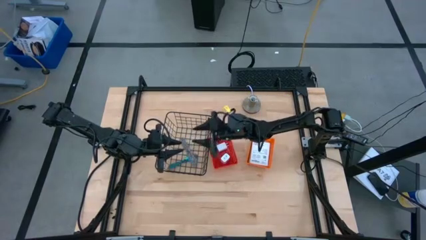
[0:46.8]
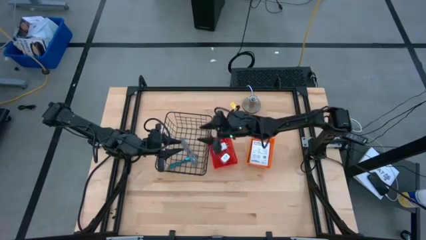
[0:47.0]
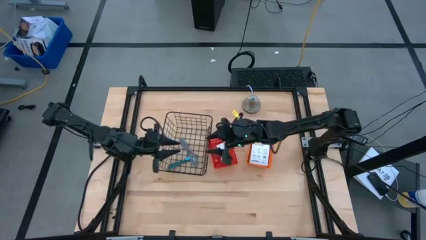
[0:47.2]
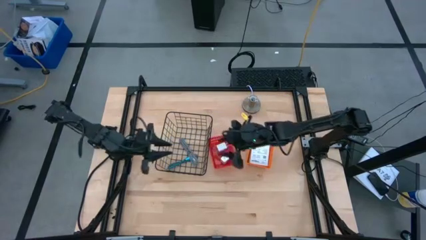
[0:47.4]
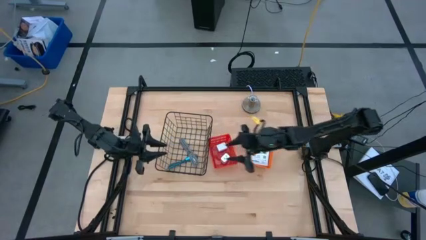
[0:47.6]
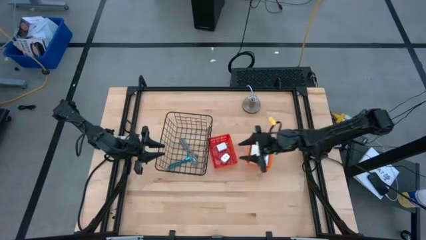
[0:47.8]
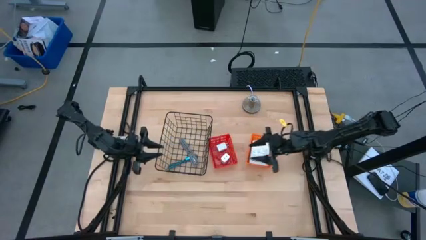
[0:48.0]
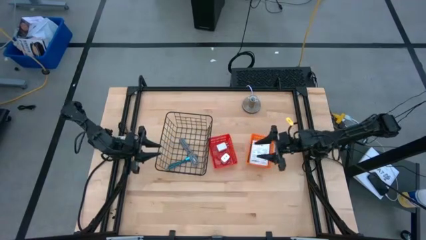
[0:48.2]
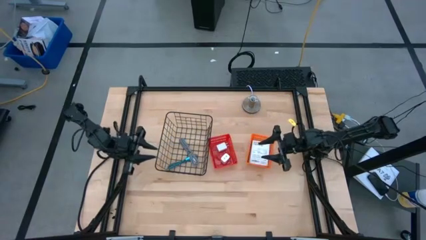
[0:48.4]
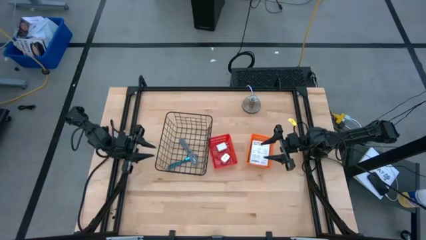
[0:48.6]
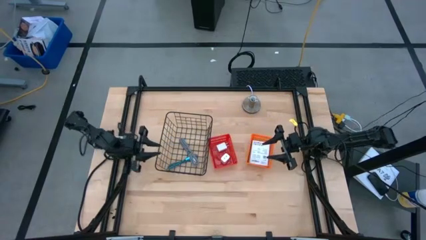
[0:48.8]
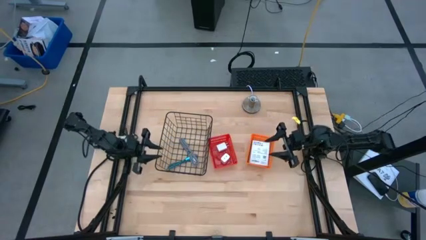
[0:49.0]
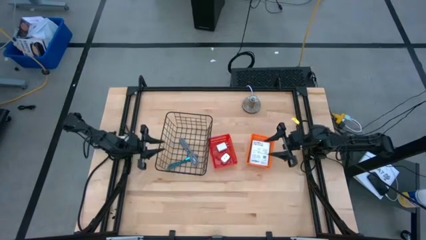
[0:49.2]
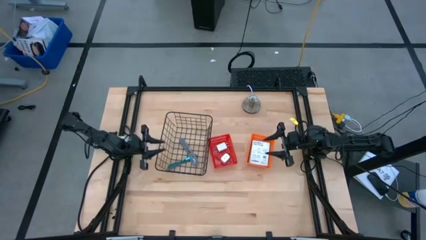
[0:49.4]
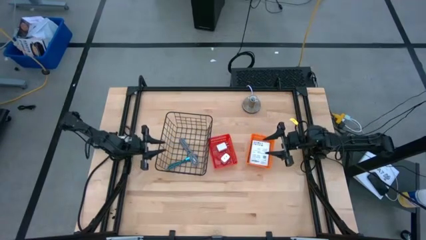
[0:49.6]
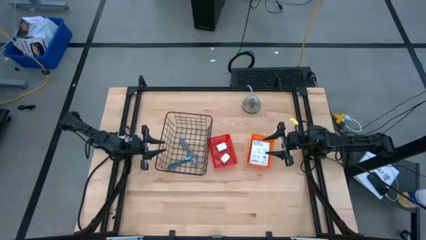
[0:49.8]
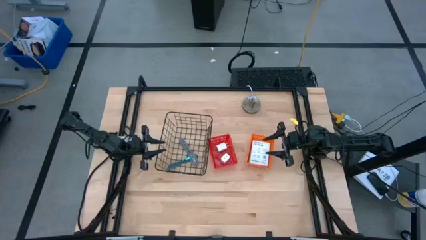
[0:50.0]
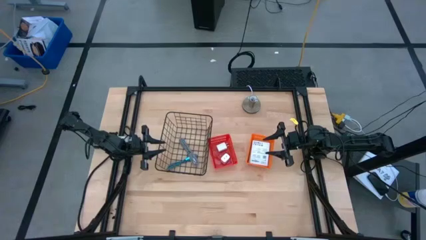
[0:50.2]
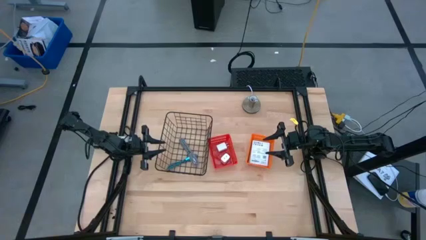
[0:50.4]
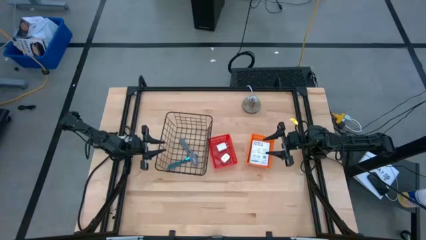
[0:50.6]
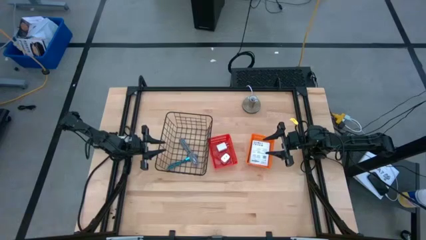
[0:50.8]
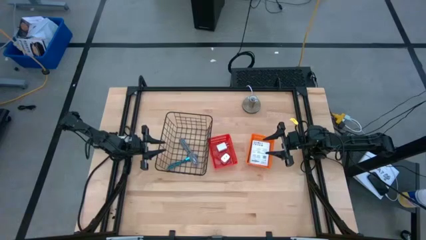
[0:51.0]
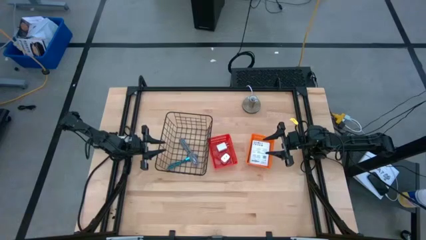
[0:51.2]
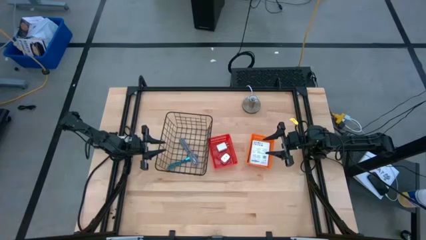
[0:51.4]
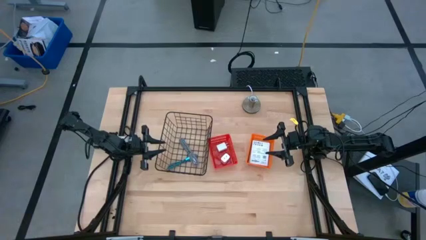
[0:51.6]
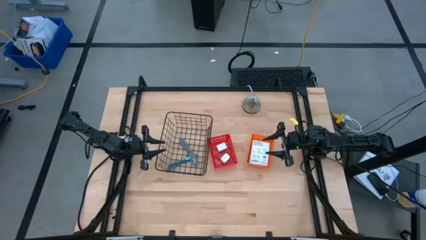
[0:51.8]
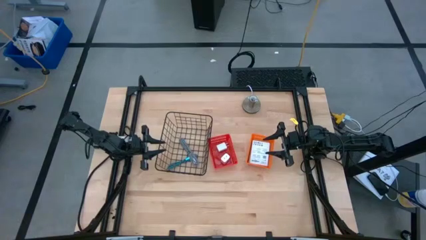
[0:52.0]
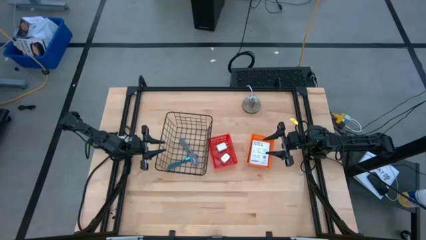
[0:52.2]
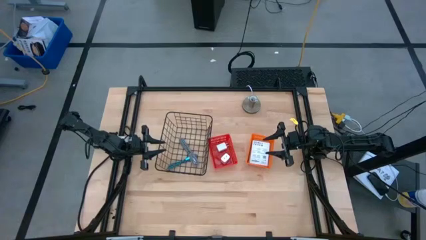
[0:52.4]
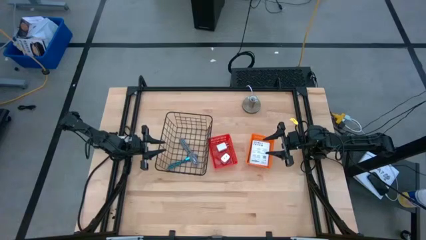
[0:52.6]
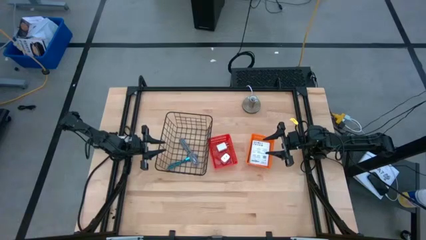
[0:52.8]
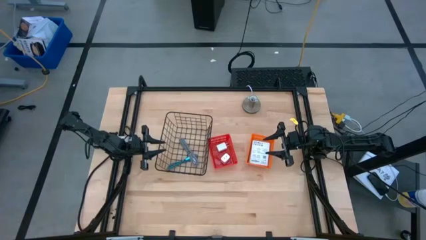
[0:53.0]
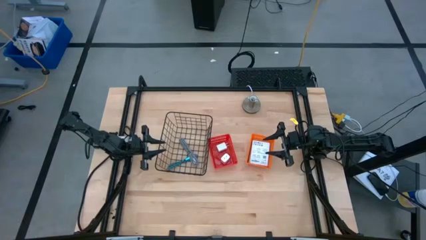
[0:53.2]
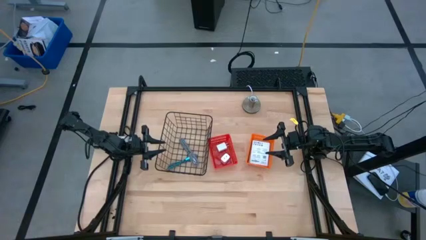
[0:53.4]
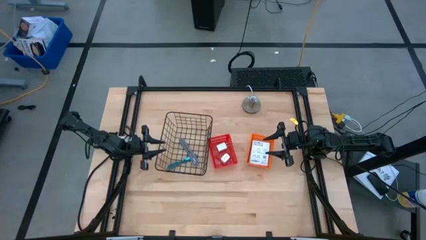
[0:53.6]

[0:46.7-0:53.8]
Task: Pick and place items into bin
Return to Home Position

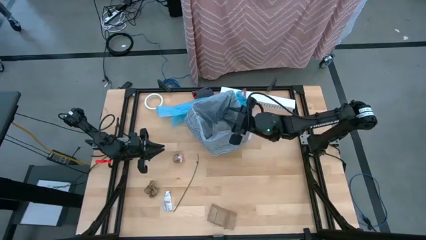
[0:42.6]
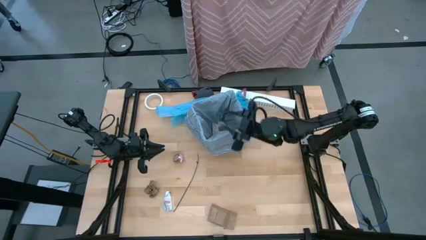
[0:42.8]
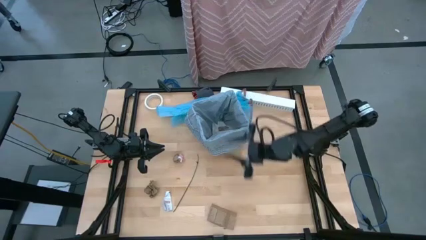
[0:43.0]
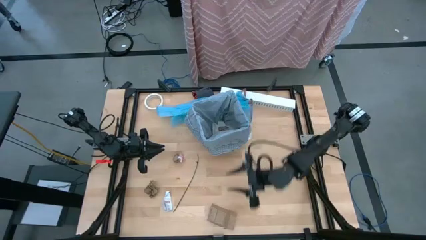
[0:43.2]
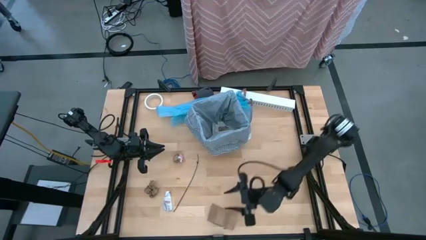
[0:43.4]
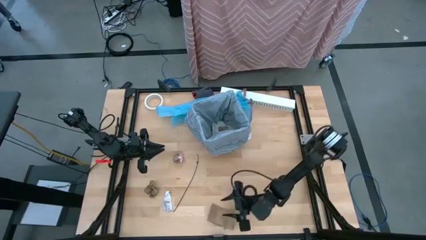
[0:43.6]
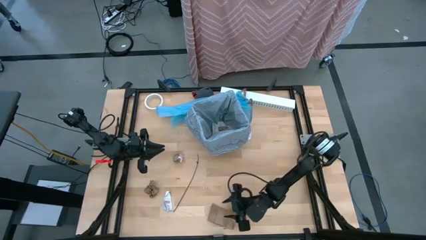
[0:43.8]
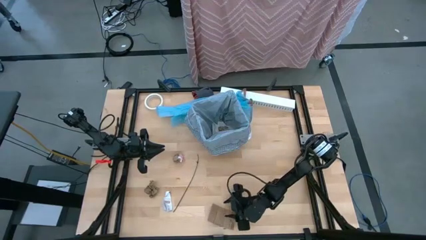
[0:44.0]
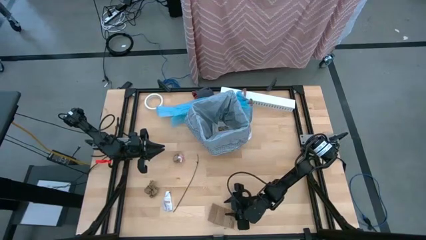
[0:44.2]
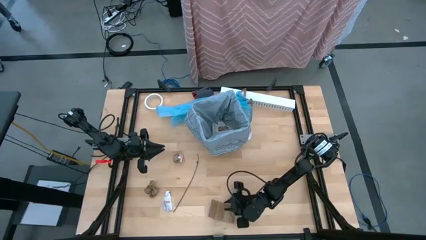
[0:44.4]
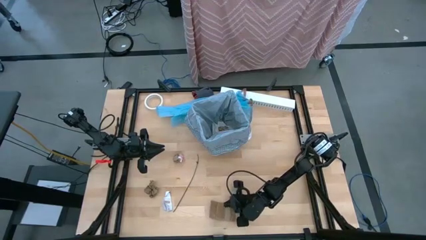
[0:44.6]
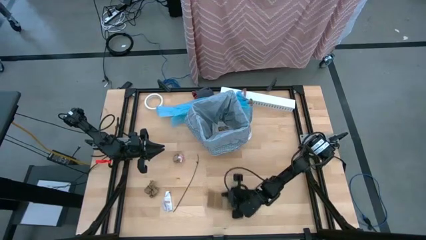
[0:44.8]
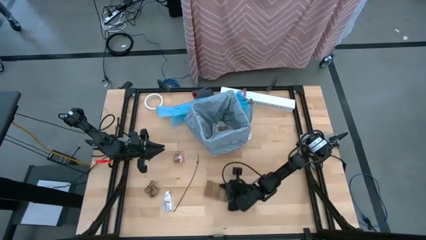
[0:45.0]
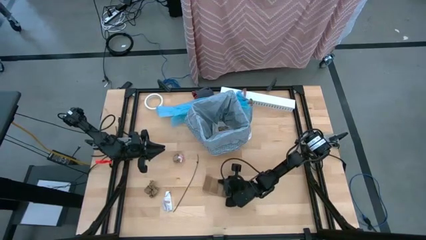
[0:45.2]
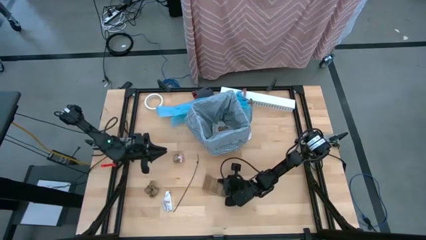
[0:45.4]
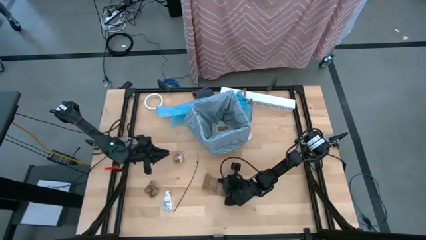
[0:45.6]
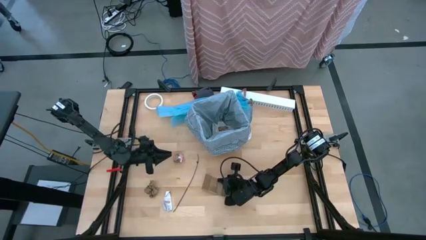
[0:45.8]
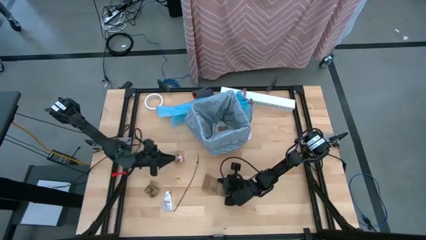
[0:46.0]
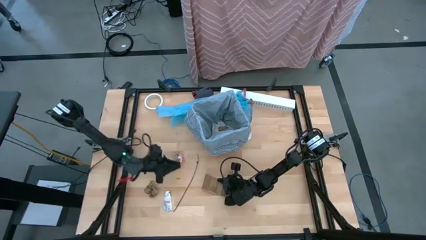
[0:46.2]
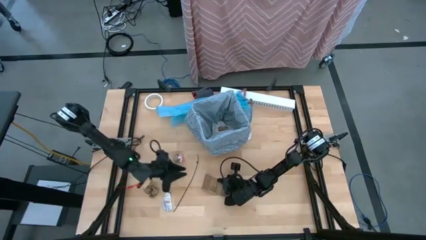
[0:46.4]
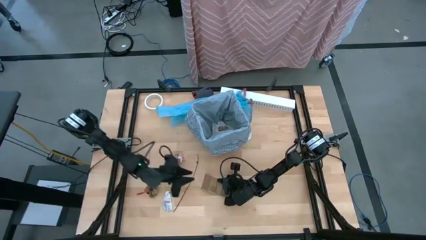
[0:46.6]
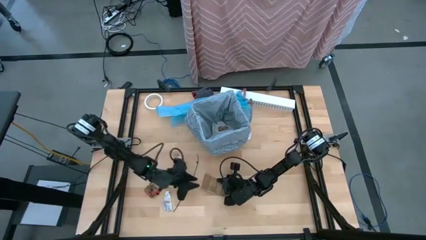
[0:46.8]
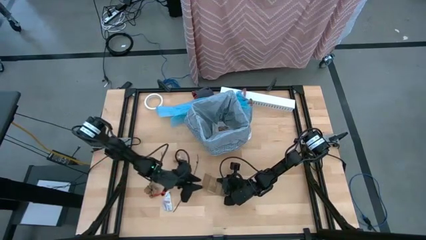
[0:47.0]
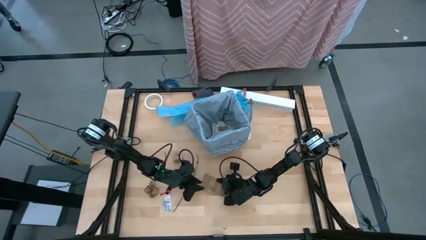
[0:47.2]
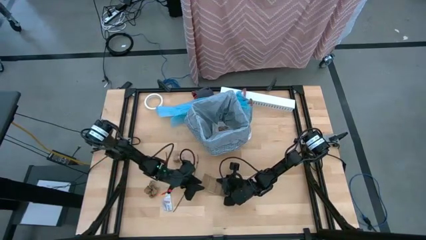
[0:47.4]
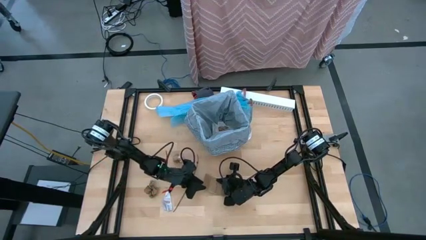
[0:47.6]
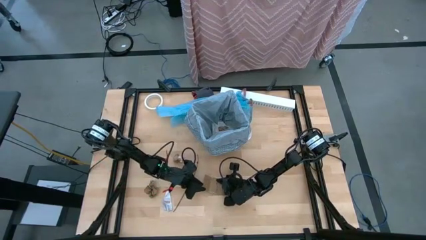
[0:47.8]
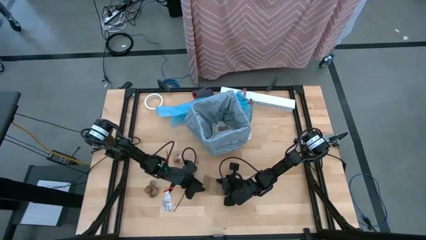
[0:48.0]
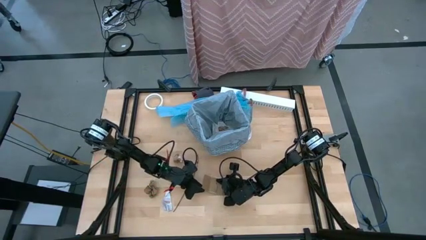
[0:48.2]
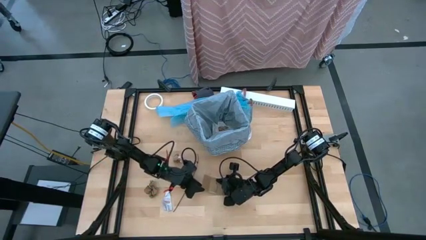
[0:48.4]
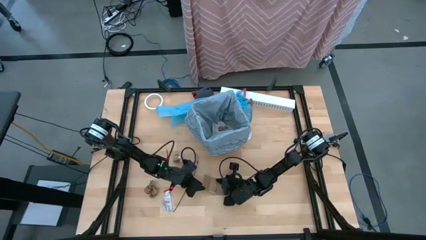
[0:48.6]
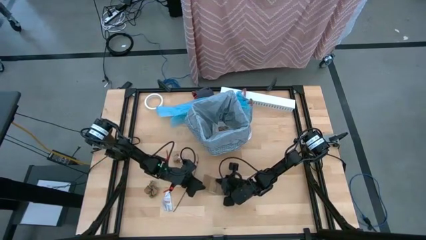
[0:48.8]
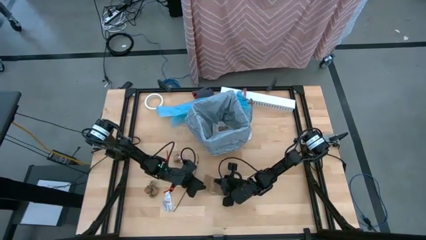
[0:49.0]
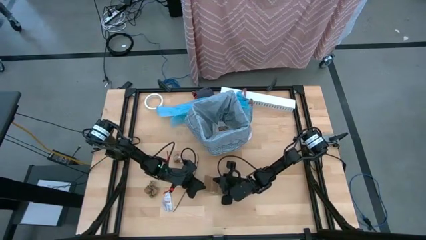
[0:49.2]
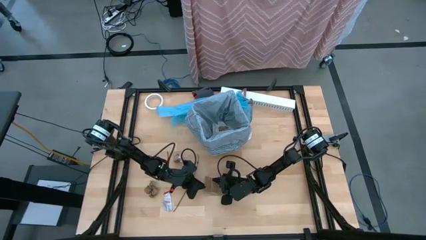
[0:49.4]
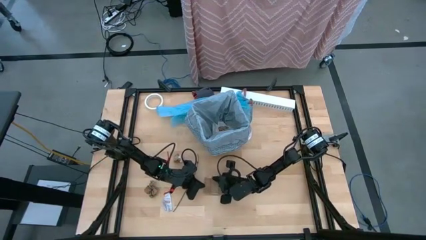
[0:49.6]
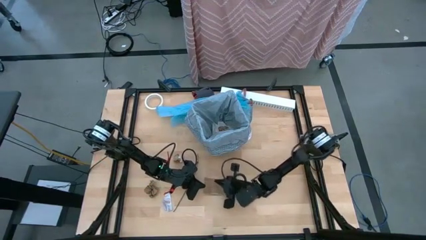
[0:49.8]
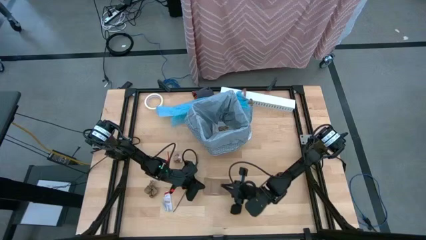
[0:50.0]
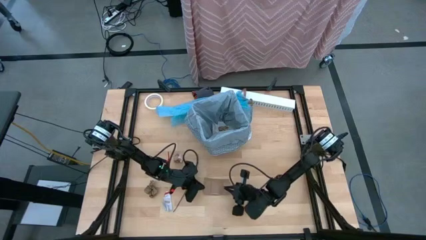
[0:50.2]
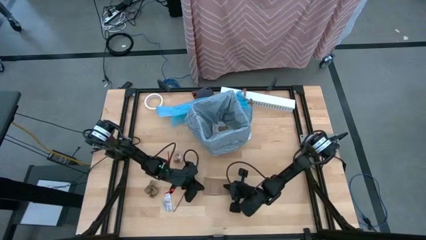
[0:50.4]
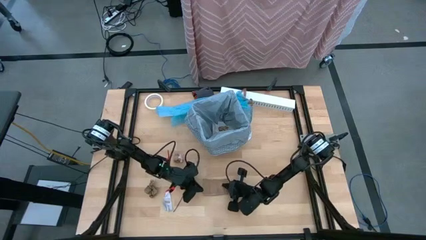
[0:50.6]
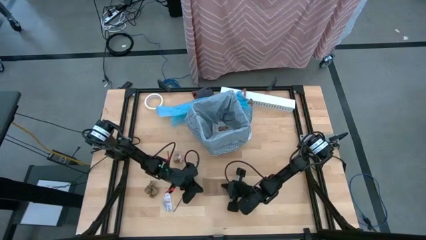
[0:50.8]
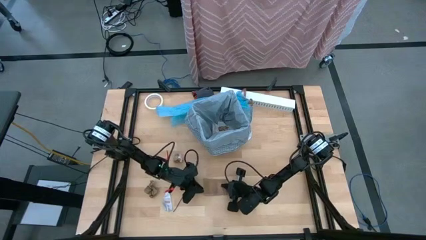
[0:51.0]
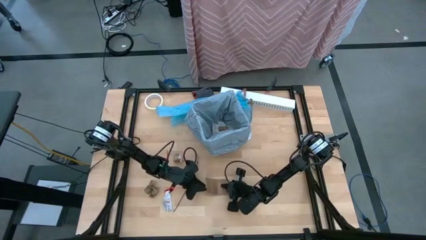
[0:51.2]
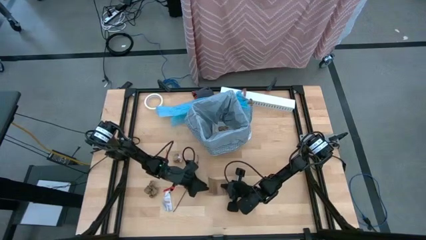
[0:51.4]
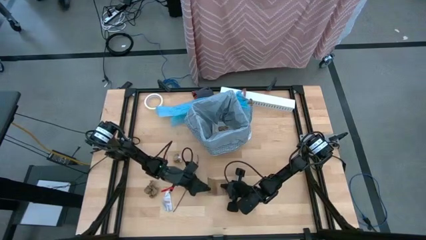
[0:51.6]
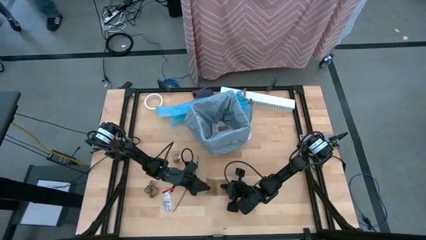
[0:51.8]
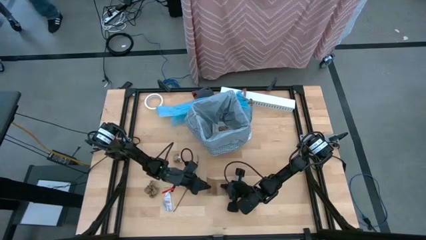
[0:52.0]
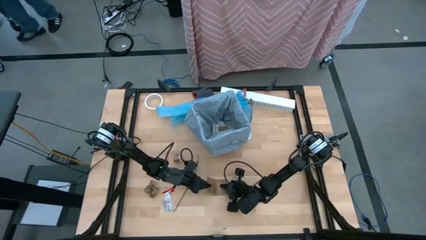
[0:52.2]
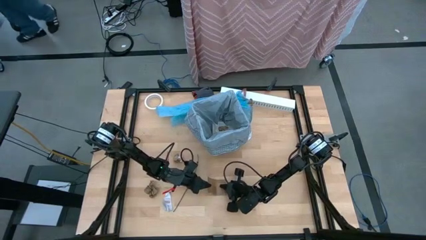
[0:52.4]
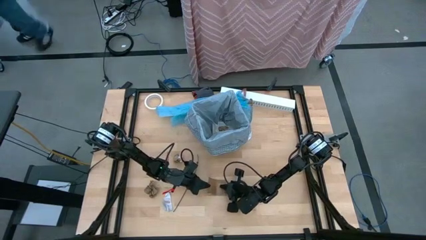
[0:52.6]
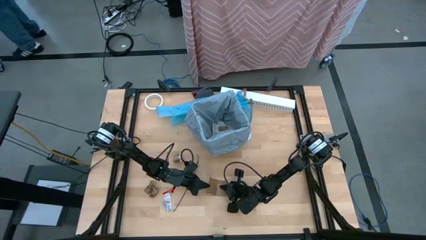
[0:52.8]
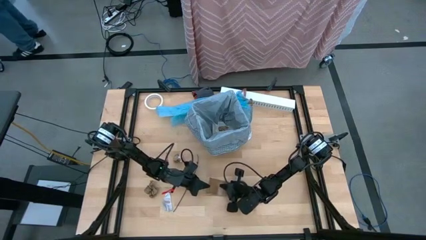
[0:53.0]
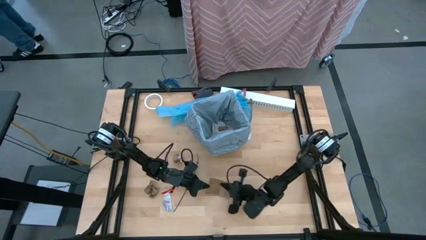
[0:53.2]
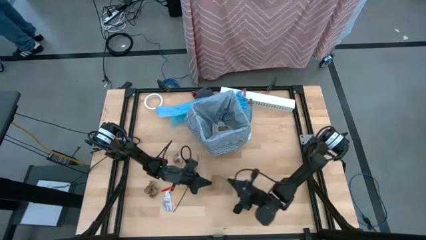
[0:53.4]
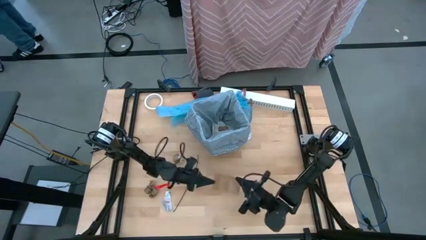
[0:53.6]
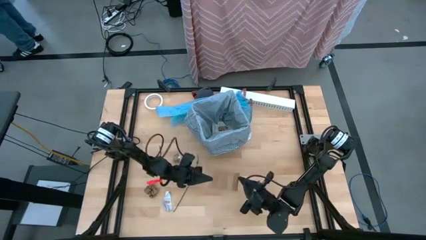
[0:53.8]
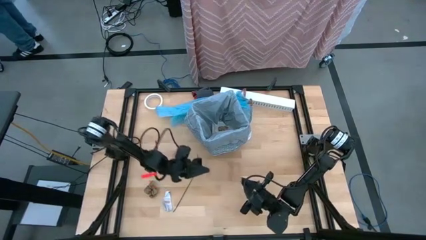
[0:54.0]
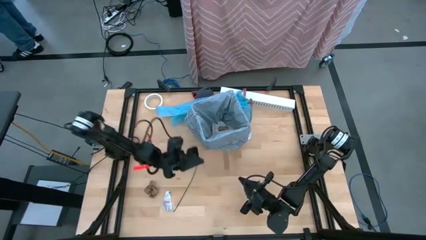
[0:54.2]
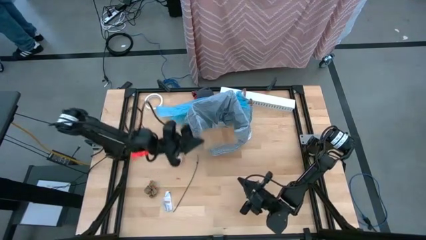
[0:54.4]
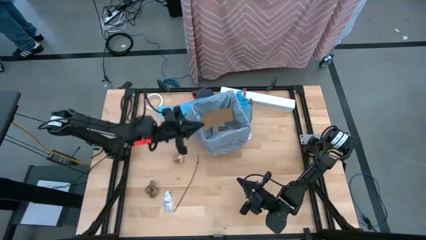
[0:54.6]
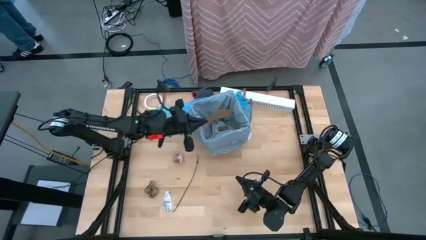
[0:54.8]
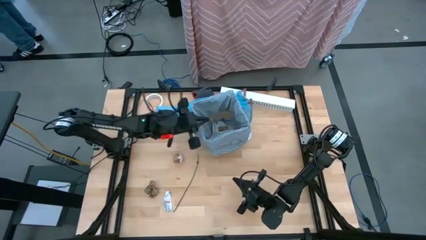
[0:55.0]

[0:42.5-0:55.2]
Task: place trash/remove bag and relplace
Put the cardboard piece inside the black trash bin
